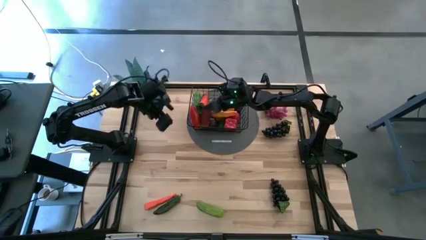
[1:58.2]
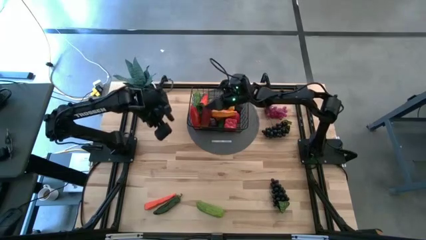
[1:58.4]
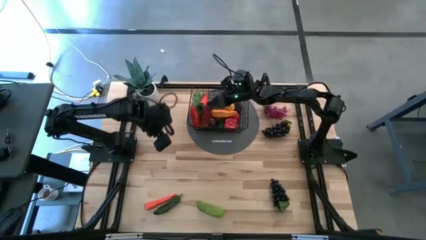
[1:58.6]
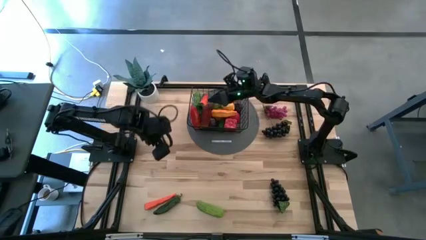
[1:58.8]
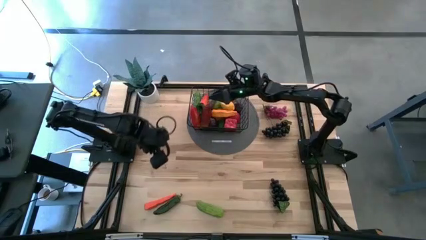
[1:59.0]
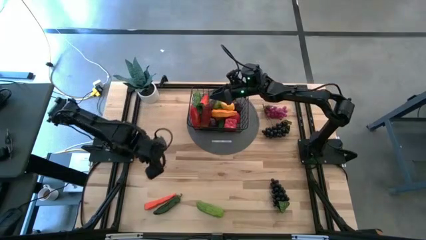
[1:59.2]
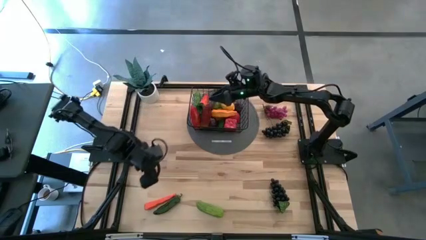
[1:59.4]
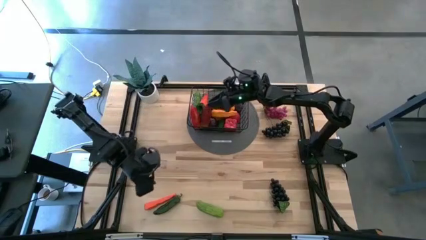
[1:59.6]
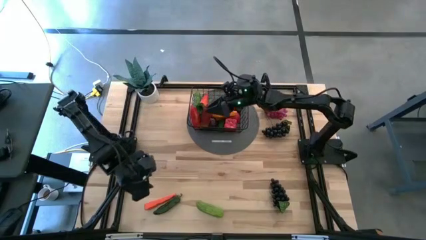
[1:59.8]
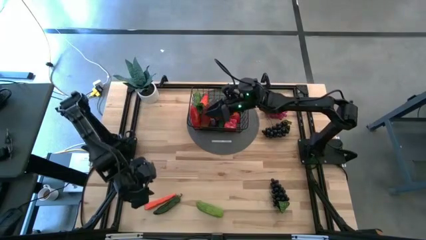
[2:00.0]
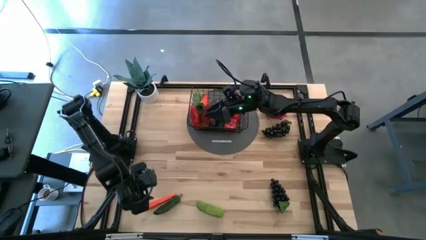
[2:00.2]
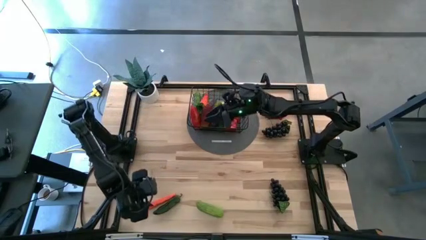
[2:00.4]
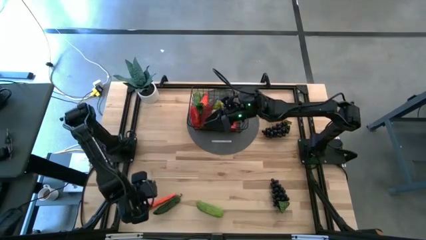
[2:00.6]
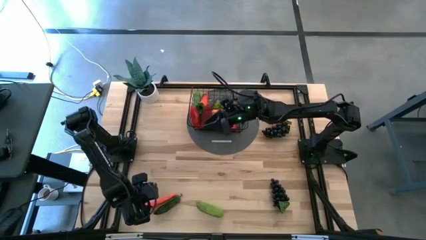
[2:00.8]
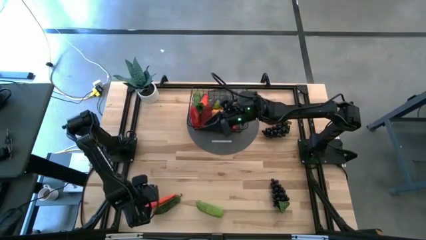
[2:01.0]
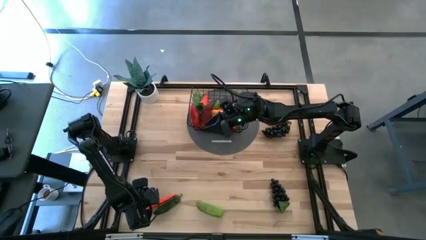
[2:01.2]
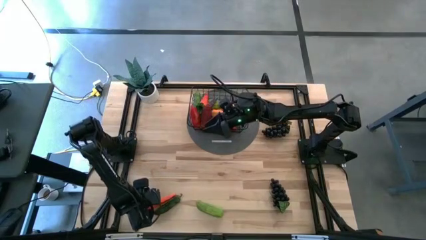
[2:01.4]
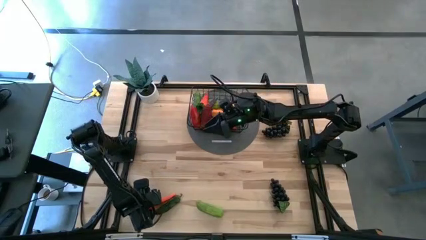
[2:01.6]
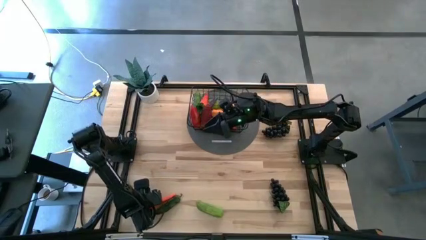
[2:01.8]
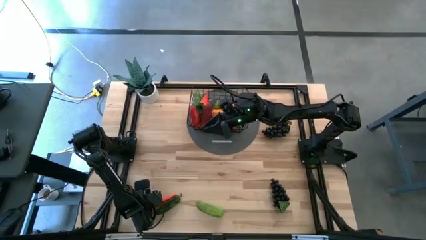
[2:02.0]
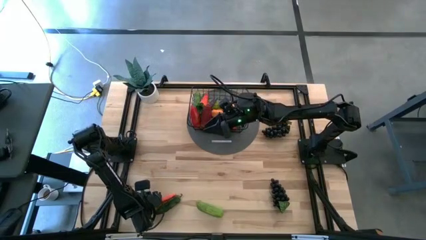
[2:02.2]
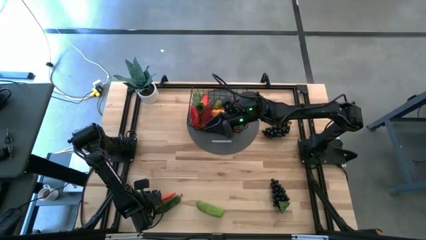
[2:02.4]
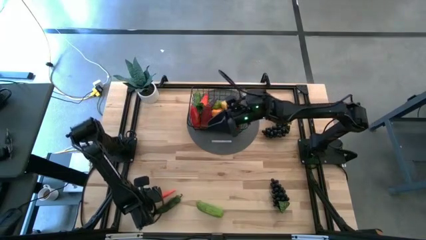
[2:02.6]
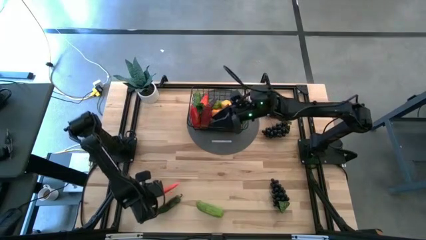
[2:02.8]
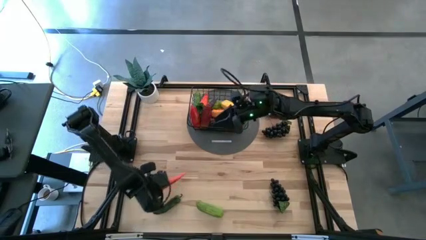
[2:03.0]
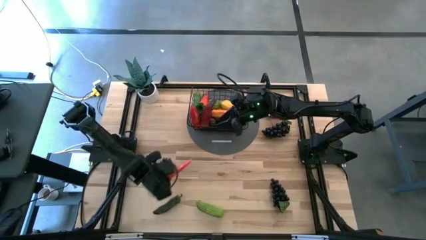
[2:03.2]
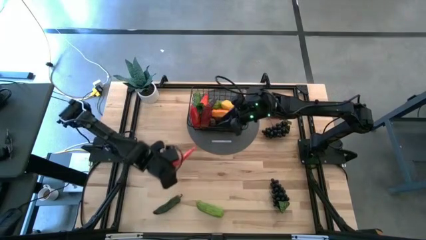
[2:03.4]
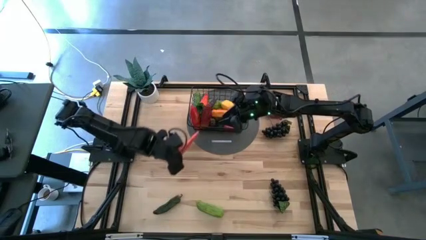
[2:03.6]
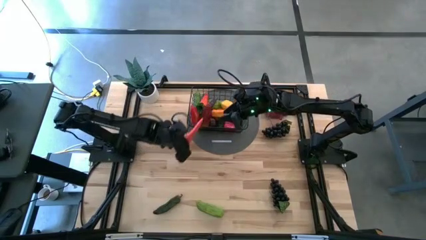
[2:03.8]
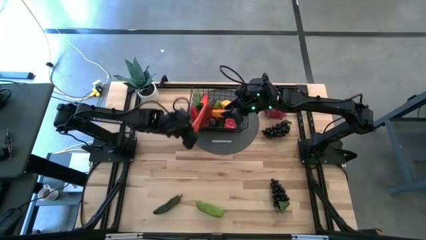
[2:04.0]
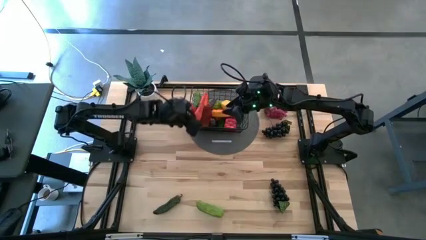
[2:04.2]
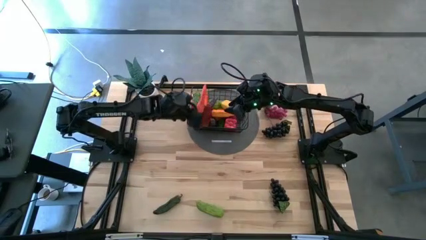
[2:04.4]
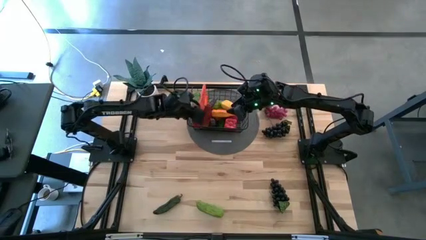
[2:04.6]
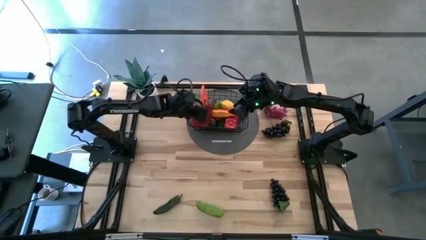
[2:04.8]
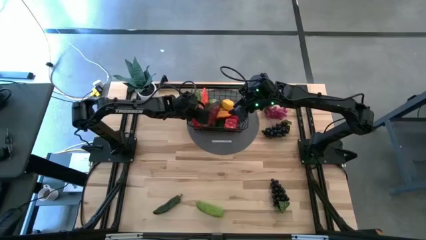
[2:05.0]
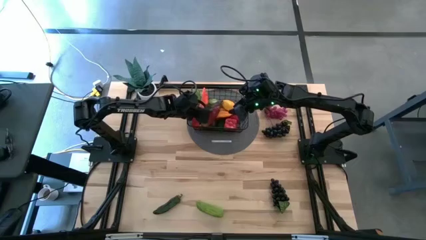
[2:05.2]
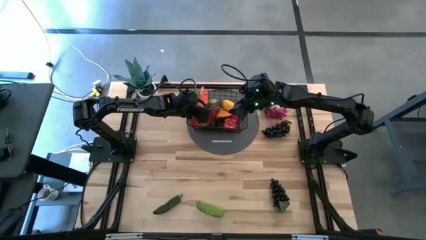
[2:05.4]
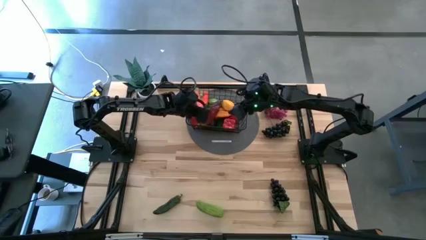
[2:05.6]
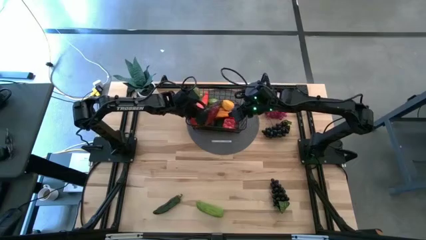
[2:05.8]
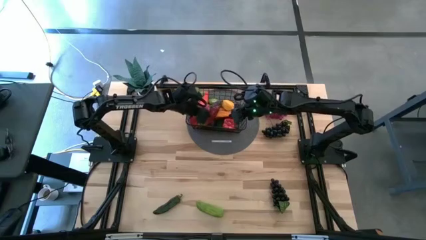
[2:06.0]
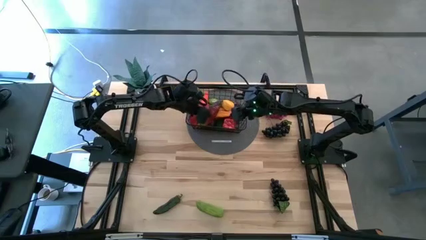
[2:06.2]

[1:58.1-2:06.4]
Task: Build produce basket
Put the carrot into the wire basket

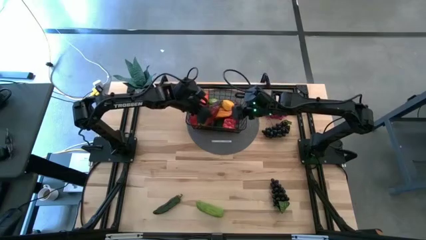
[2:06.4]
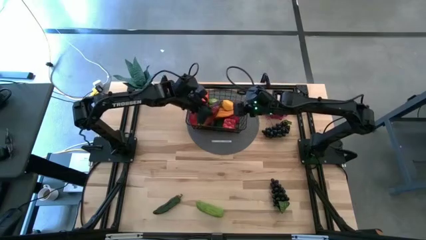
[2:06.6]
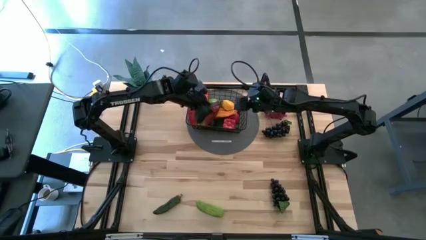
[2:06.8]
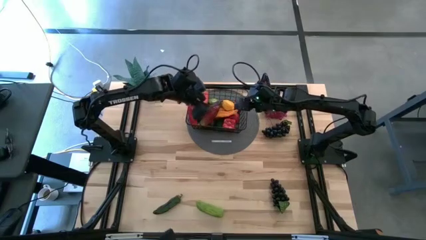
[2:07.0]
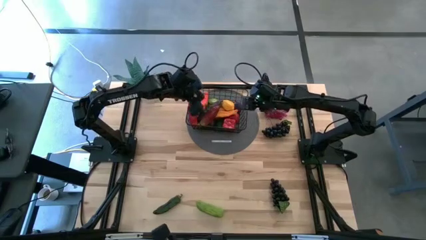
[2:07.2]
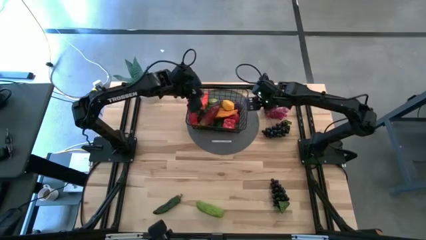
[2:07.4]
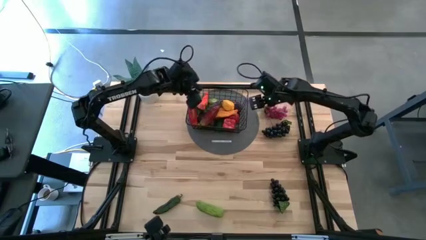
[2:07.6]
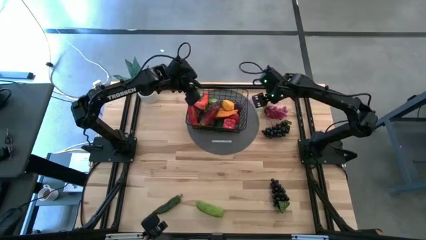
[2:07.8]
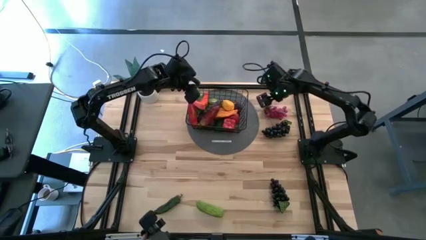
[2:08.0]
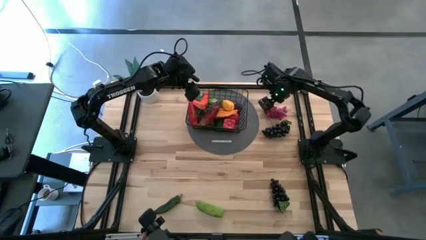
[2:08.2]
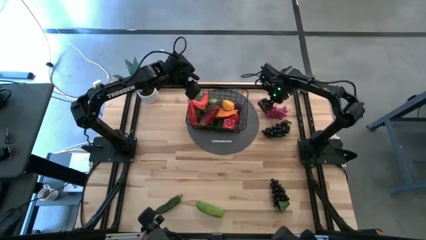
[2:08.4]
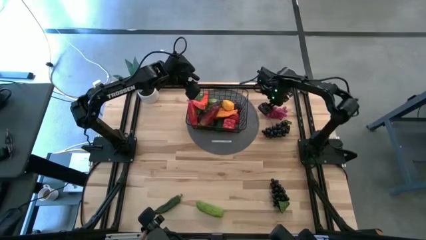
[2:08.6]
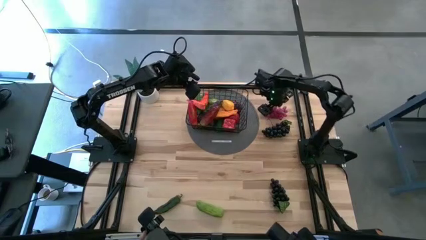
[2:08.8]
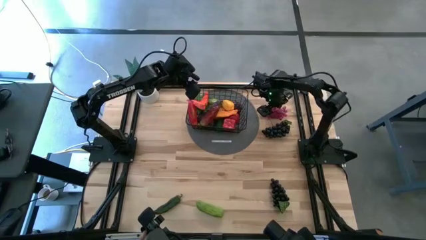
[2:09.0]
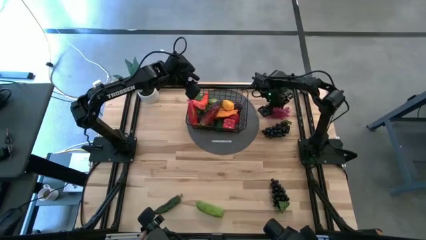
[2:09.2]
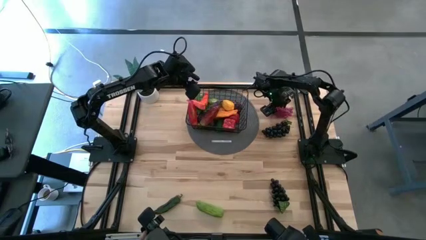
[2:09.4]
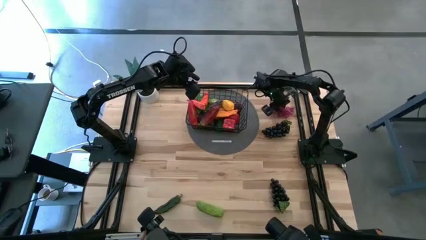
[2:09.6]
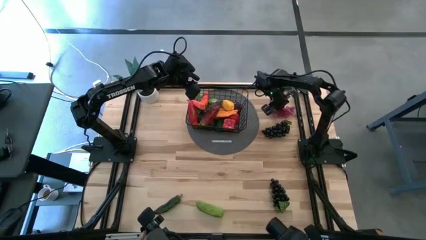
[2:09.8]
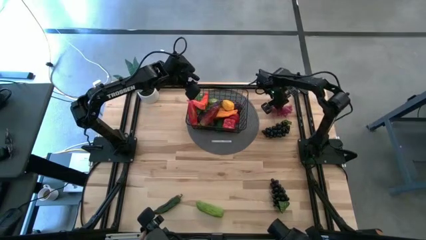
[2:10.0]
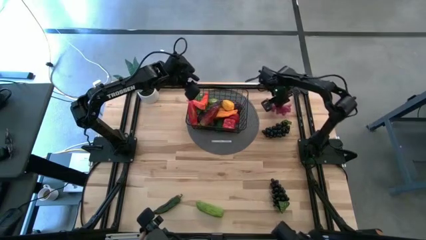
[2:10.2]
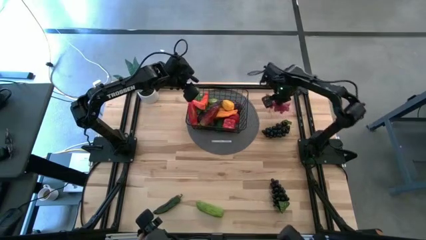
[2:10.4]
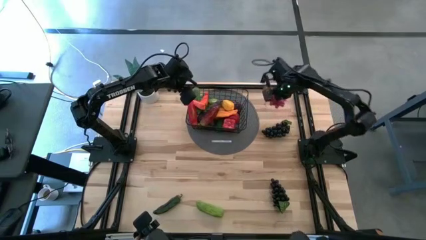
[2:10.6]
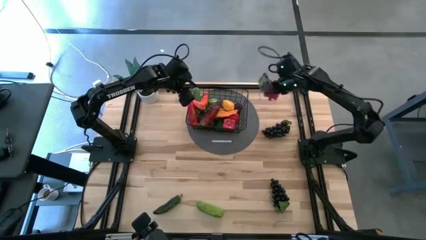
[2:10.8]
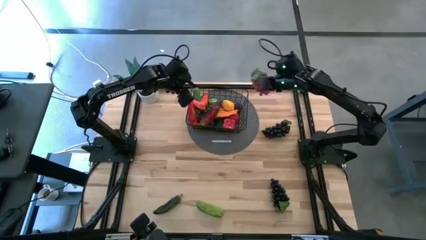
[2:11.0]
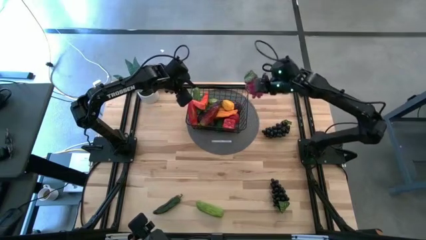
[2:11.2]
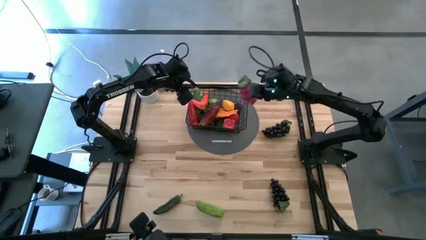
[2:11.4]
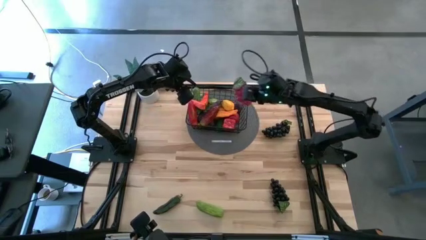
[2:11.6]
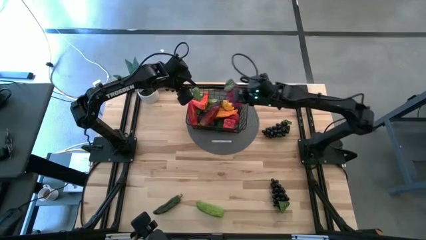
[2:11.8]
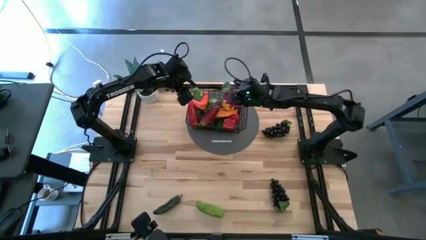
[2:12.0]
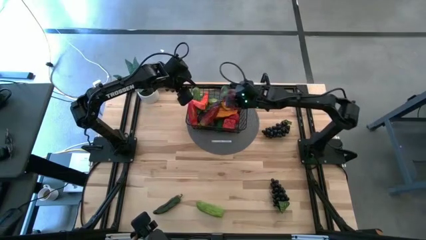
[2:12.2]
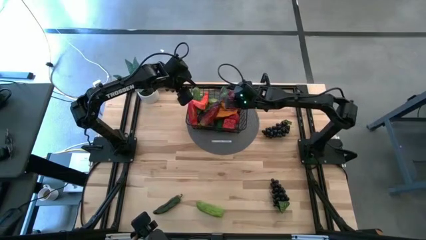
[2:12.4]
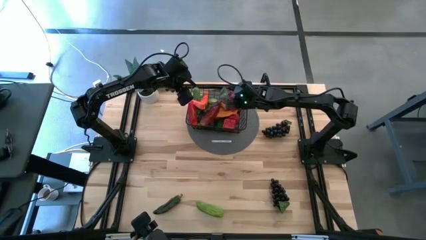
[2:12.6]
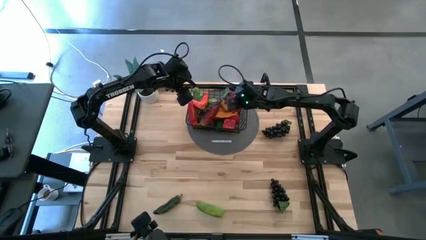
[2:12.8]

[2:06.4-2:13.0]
Put the purple grapes into the wire basket

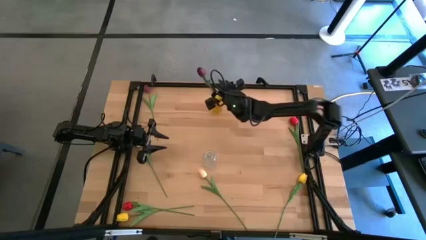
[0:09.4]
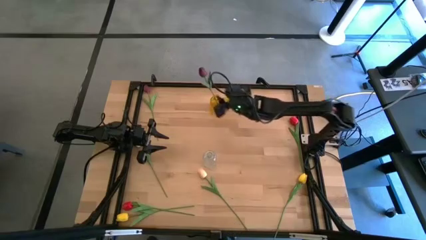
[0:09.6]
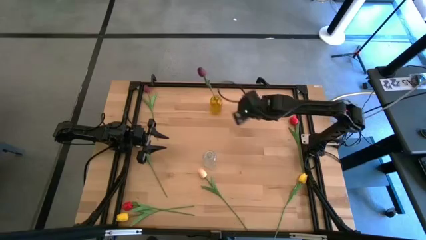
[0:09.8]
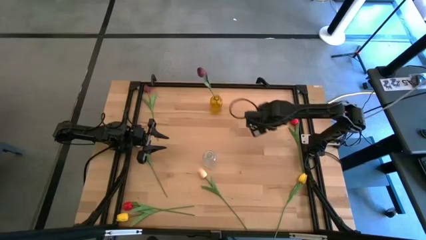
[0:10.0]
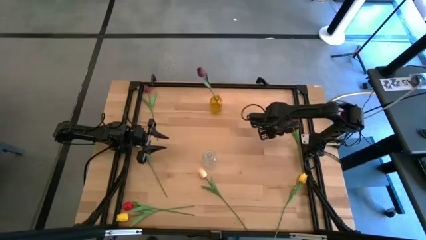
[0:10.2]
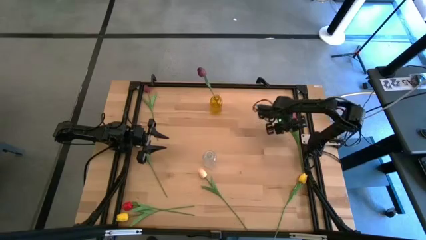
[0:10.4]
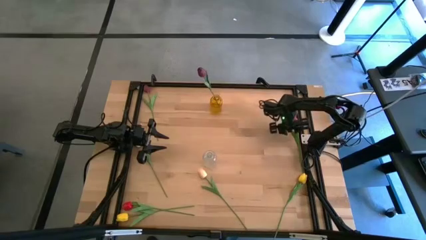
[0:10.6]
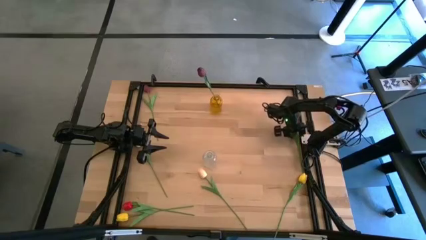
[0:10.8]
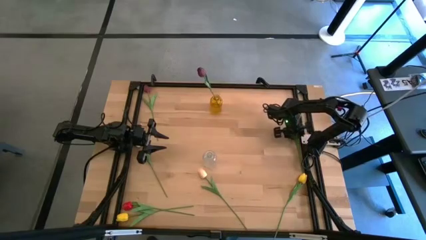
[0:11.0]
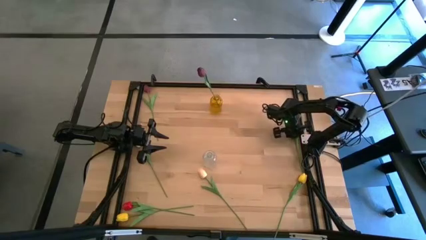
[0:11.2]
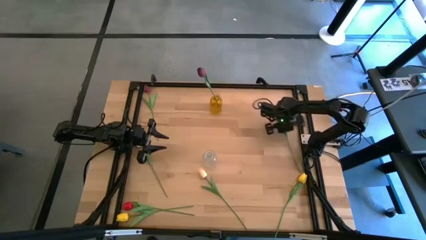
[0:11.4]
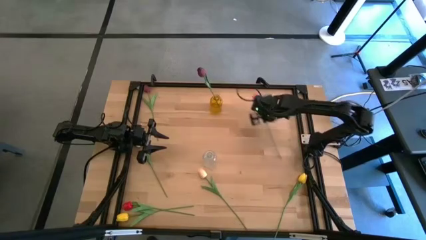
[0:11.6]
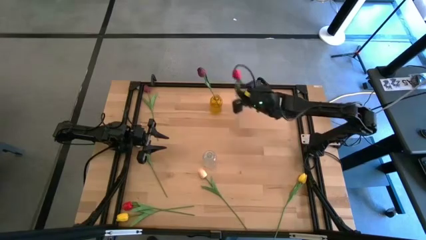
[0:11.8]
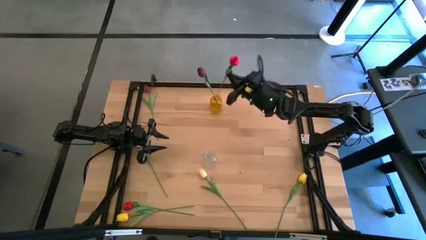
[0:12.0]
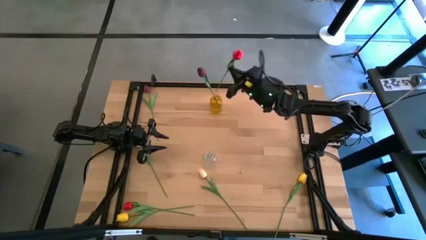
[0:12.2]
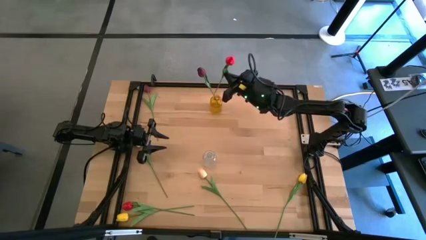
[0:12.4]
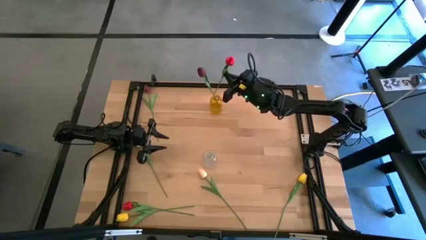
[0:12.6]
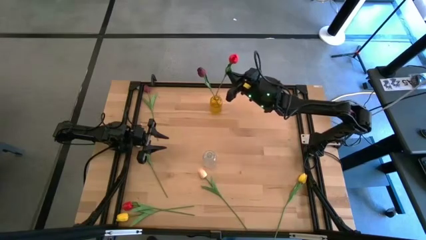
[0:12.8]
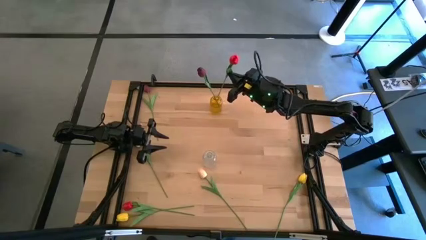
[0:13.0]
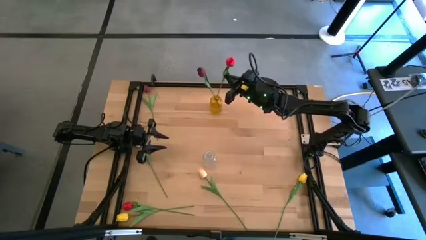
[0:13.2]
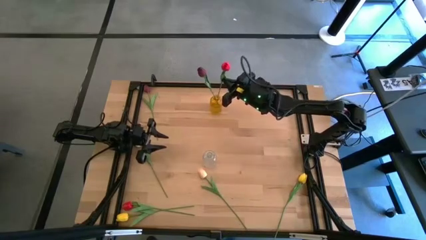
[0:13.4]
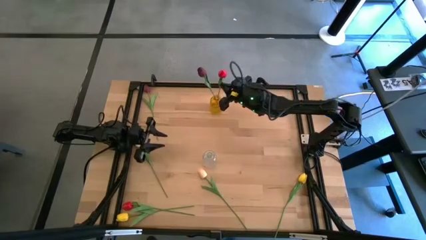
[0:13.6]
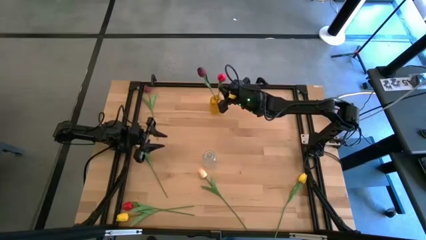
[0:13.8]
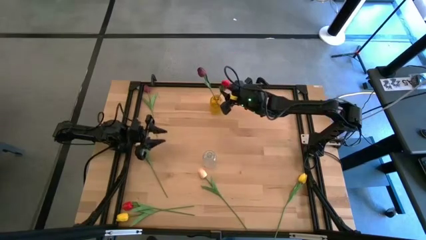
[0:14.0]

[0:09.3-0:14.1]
Task: Sort flowers into vase by color
Put the right red flower into the yellow vase
